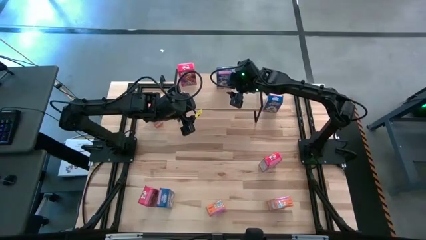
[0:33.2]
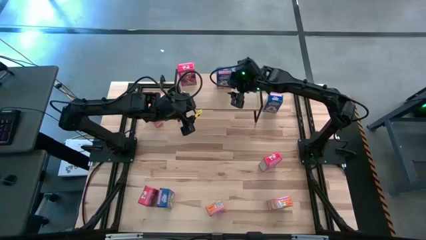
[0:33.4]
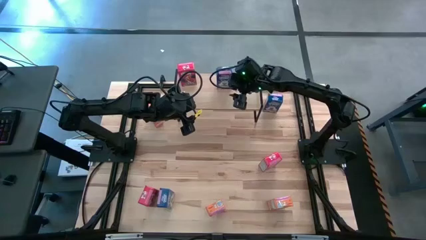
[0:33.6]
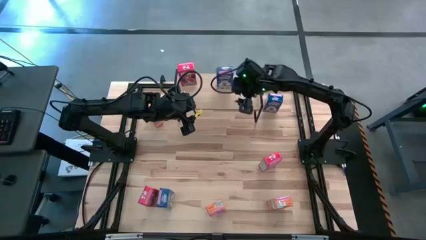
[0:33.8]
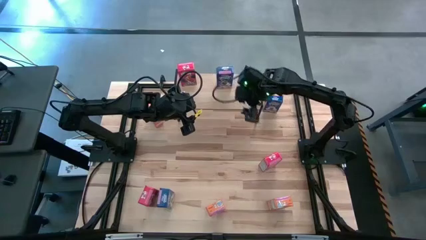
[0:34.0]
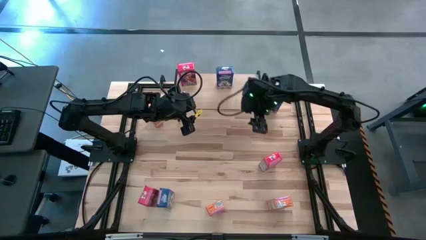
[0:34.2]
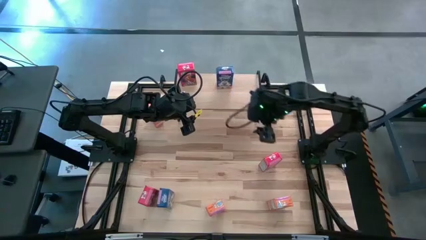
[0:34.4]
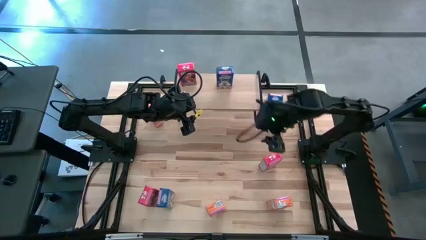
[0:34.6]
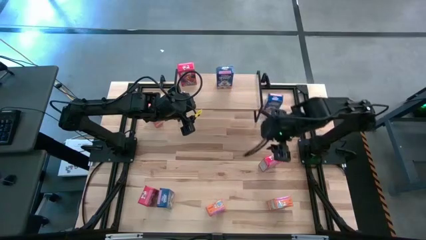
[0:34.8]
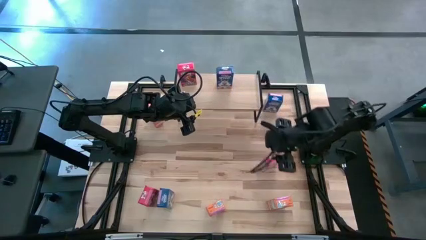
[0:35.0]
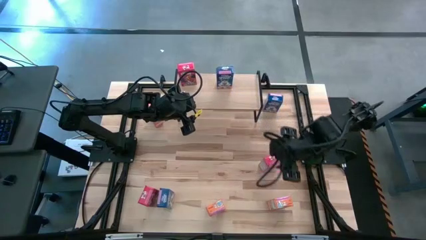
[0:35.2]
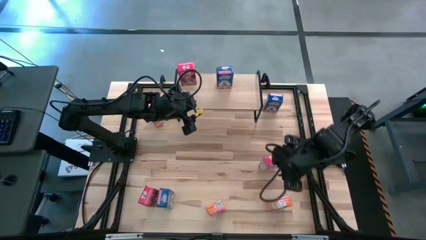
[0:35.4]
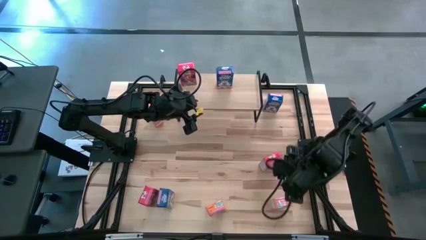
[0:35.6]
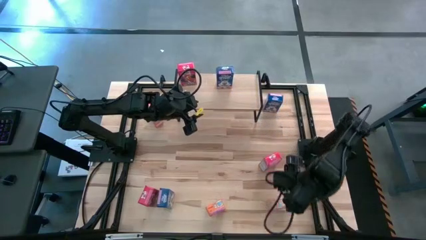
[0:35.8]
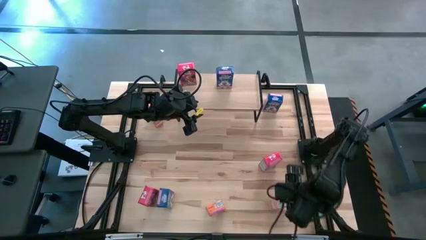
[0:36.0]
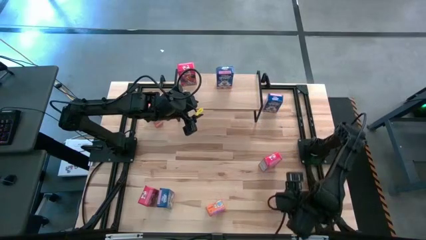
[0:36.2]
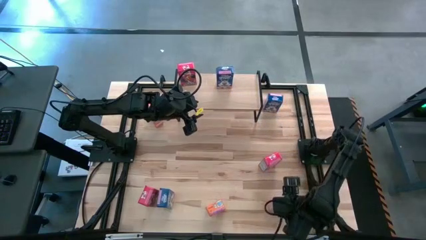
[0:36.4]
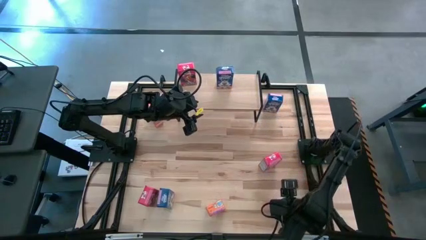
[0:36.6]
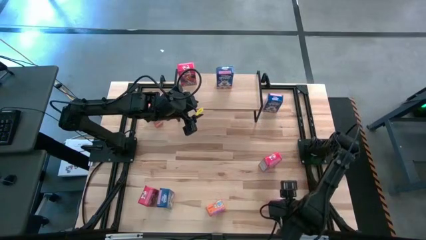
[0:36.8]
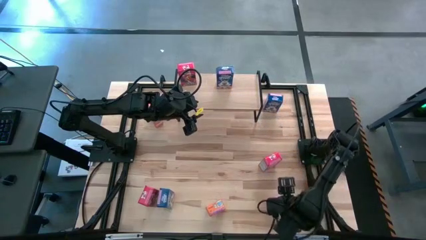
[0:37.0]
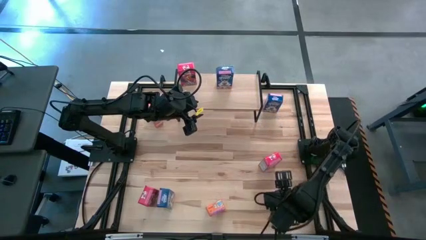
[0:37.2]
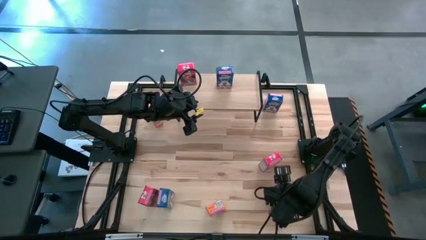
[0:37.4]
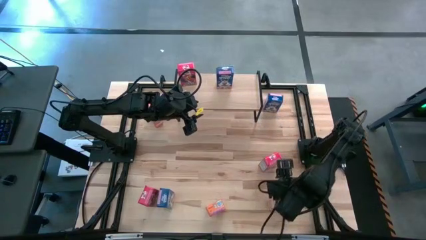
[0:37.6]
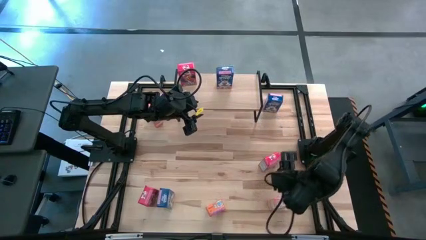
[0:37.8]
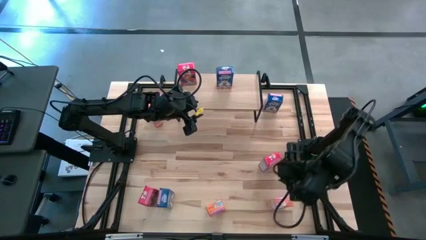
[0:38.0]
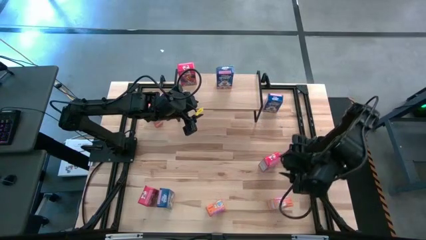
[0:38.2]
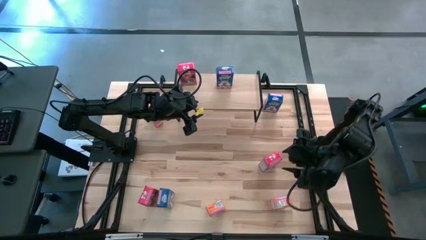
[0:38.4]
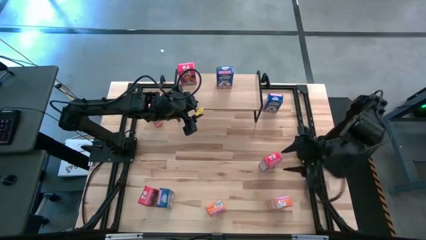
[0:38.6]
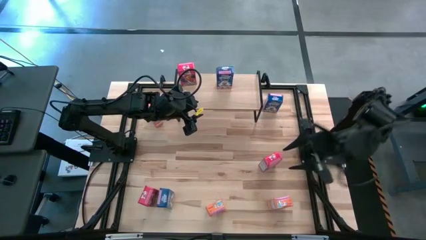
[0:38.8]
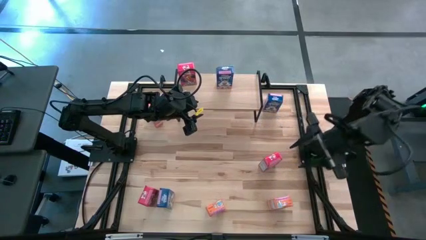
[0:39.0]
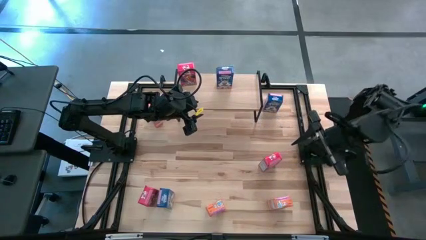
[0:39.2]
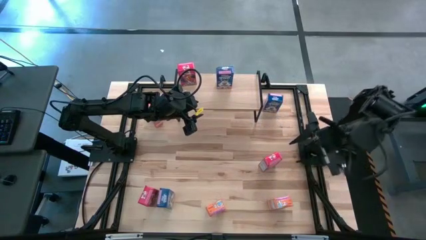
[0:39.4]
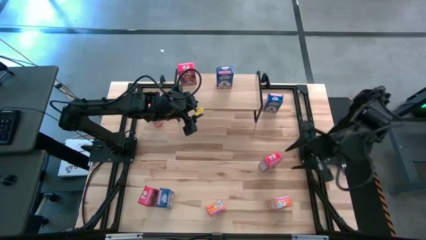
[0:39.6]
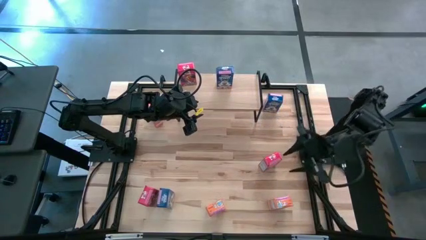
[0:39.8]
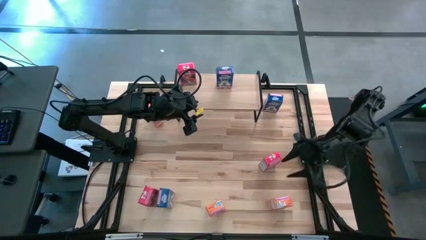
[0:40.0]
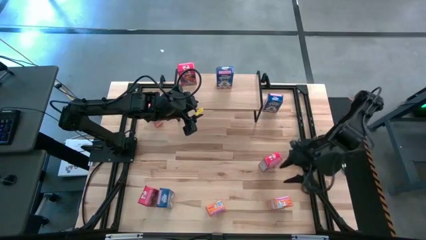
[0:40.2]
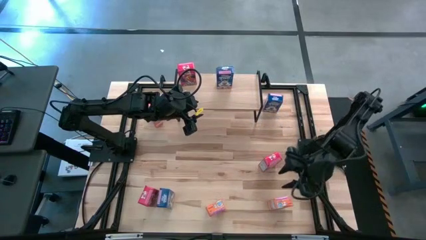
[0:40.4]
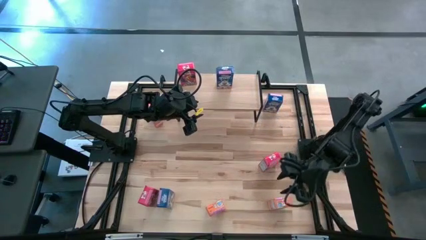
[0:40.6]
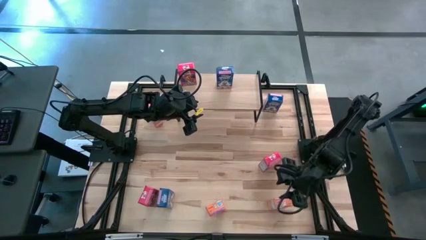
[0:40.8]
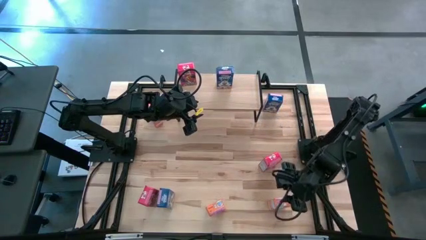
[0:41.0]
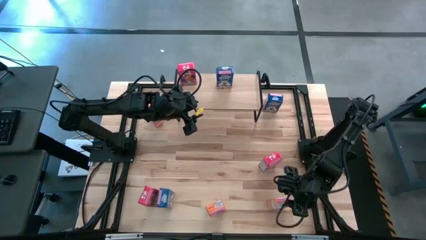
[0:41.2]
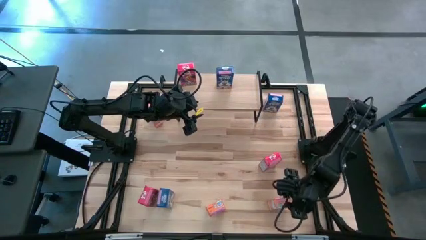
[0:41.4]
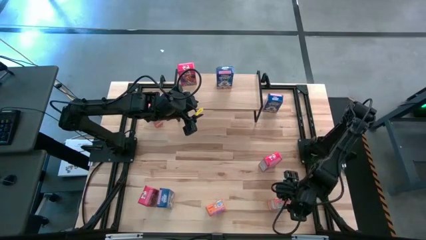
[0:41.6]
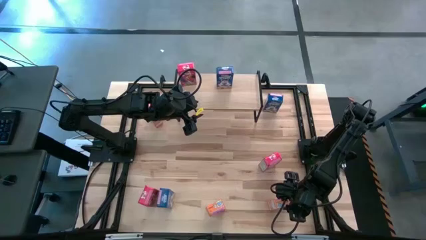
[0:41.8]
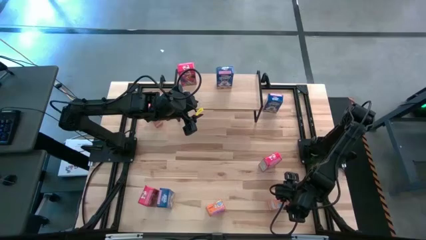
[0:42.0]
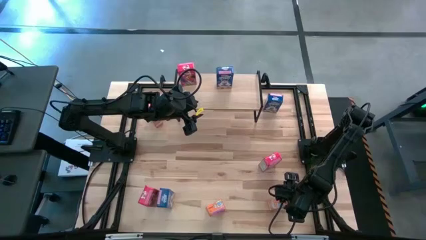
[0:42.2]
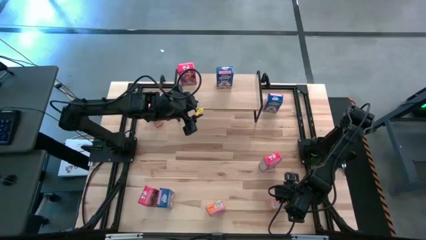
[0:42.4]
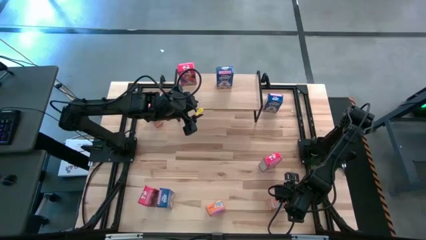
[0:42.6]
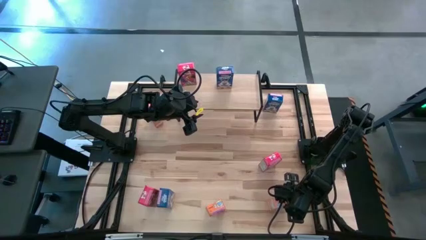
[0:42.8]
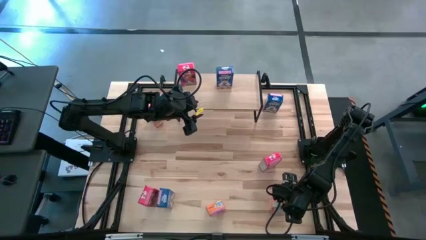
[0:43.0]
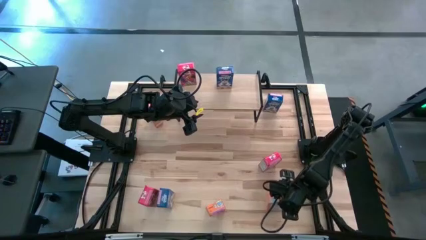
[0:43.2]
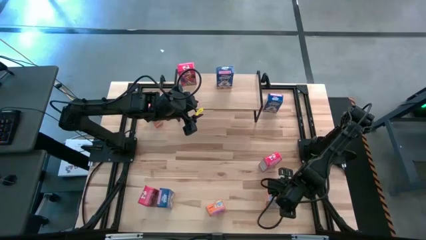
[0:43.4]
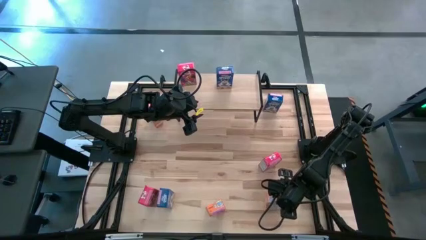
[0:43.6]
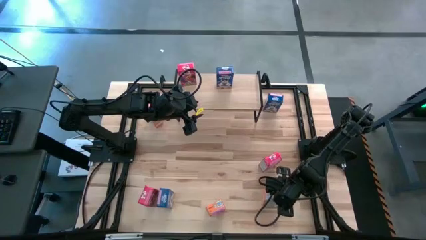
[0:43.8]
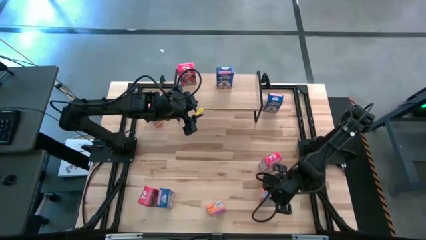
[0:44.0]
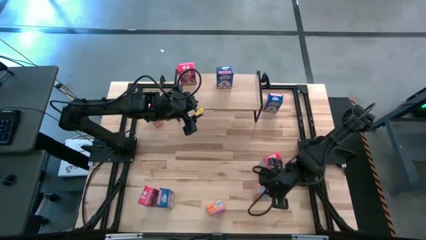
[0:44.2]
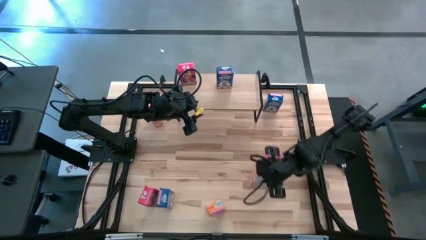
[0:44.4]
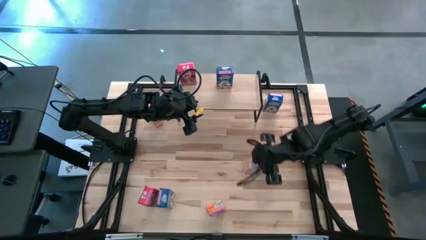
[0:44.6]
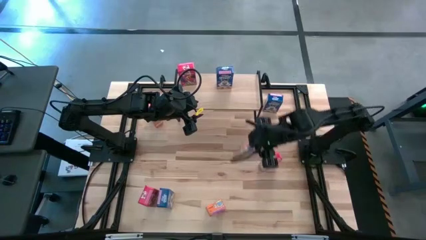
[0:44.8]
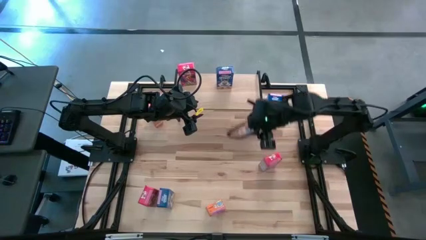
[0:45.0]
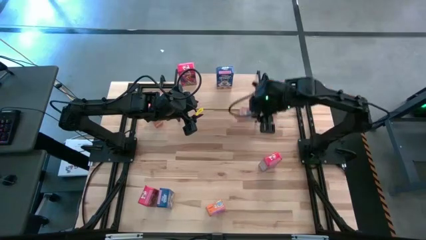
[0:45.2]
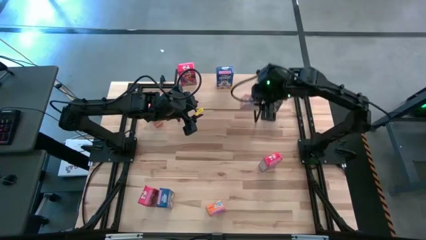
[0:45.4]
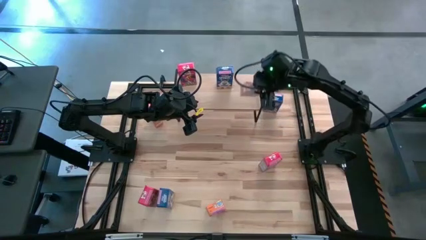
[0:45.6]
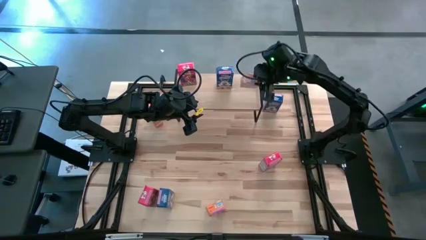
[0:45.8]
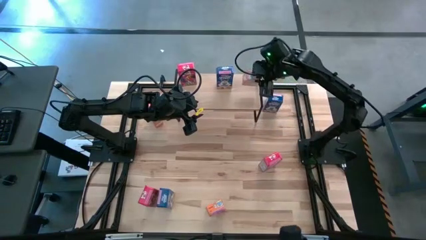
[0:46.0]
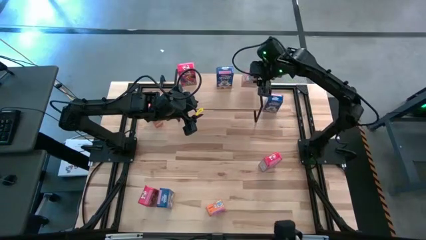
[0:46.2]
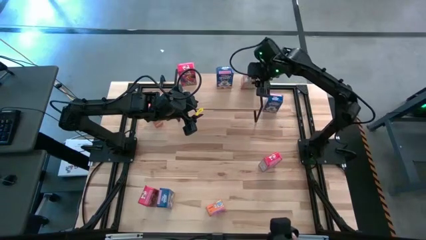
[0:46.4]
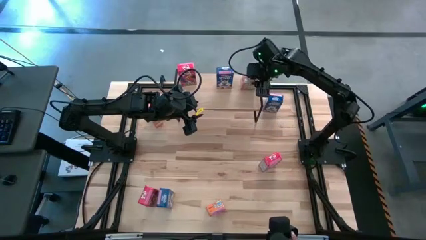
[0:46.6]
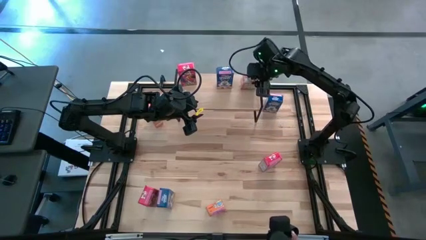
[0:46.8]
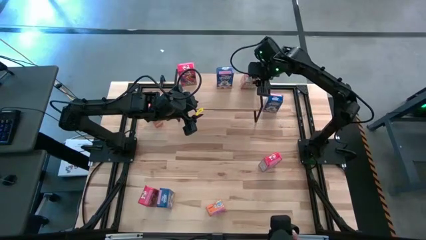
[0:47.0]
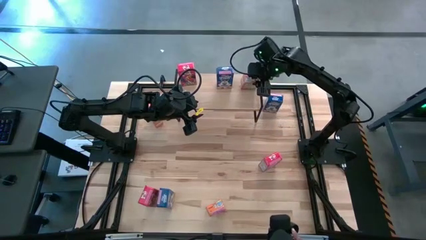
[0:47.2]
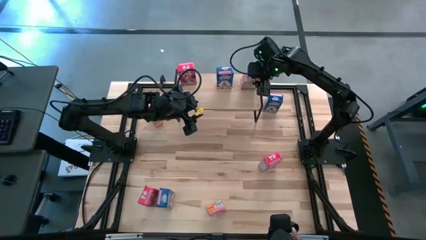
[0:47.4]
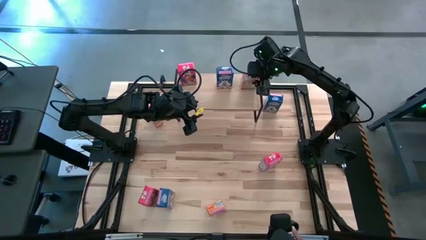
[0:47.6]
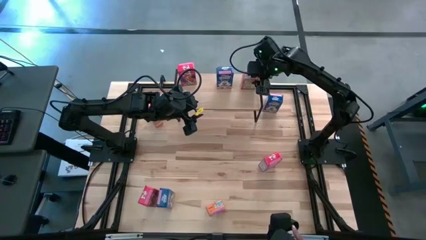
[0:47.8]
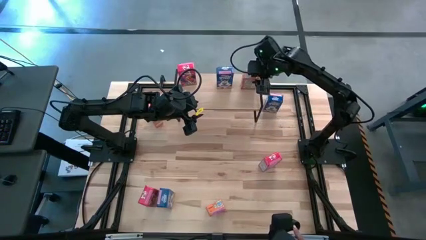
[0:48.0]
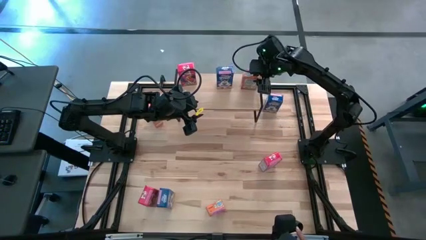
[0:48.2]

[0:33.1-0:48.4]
Task: Stack cereal on shelf
Put the right orange cereal box on the shelf
